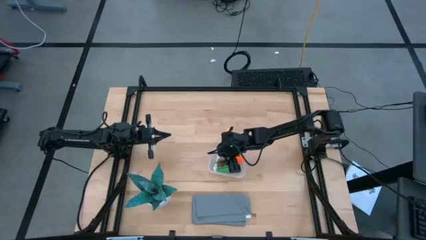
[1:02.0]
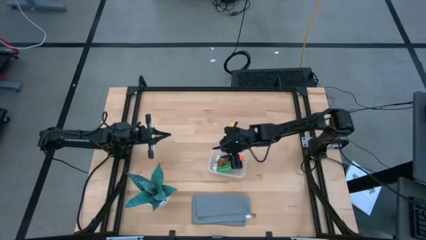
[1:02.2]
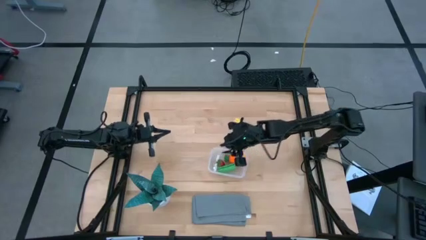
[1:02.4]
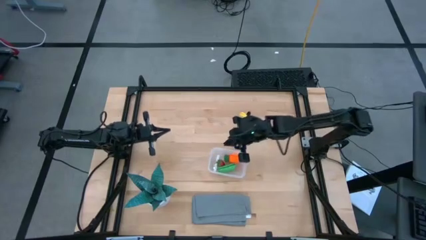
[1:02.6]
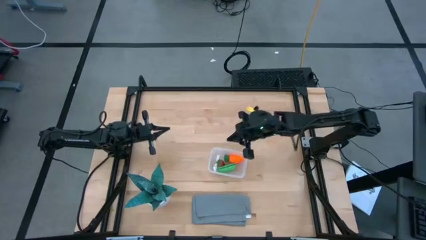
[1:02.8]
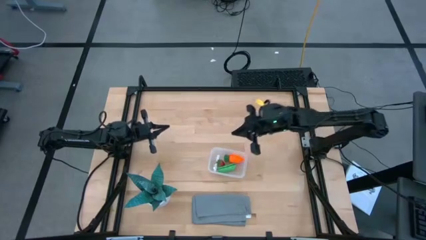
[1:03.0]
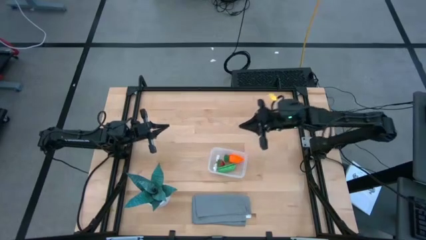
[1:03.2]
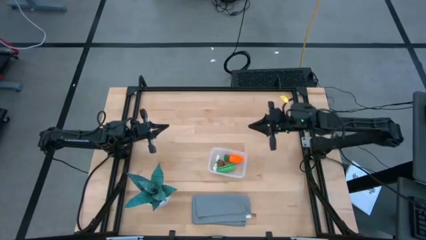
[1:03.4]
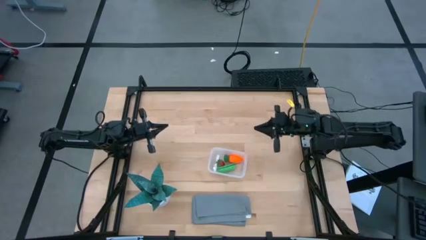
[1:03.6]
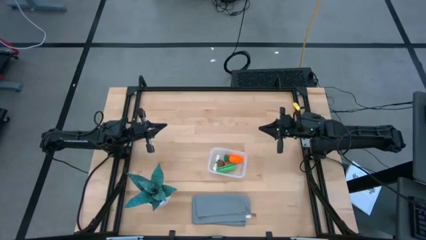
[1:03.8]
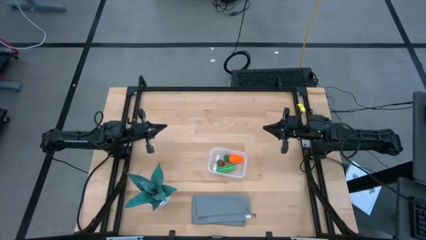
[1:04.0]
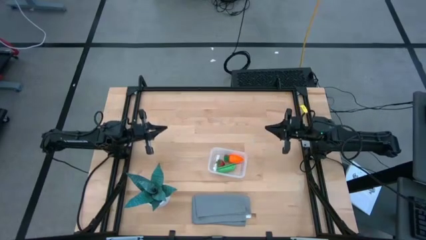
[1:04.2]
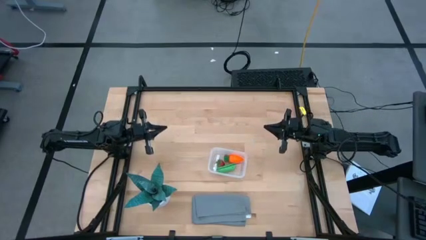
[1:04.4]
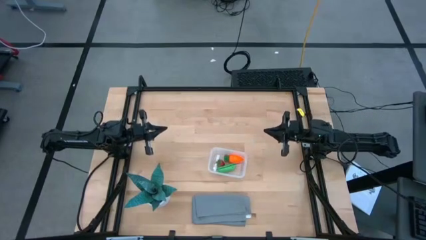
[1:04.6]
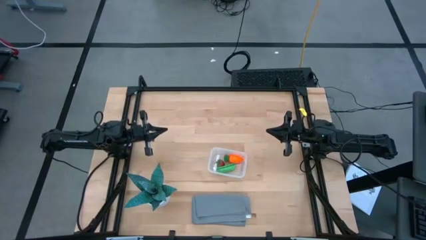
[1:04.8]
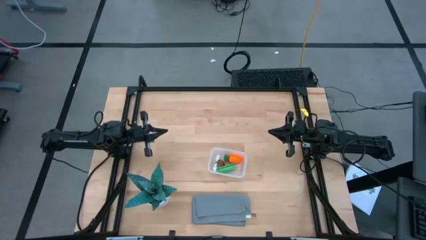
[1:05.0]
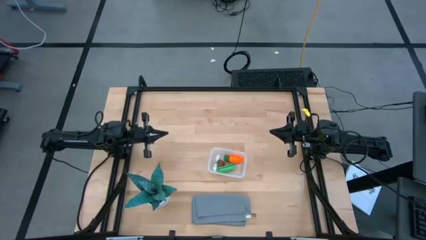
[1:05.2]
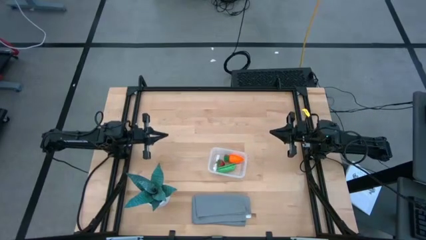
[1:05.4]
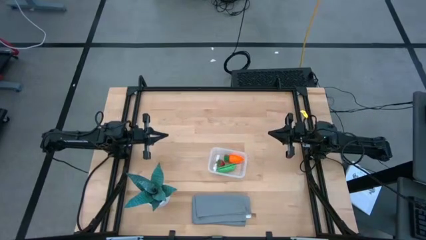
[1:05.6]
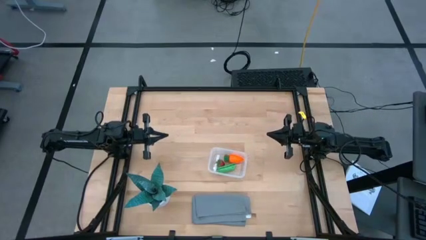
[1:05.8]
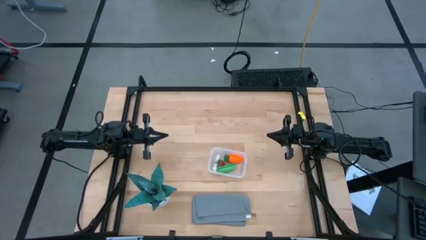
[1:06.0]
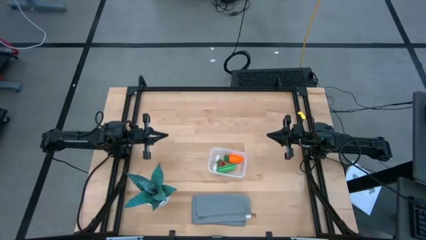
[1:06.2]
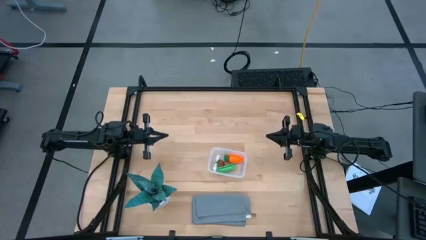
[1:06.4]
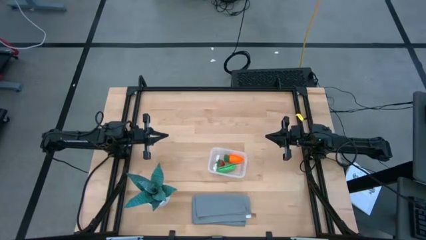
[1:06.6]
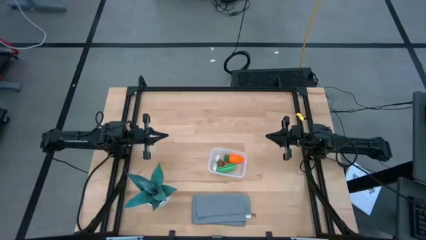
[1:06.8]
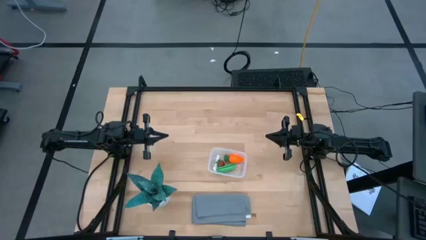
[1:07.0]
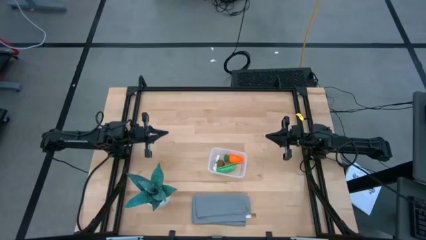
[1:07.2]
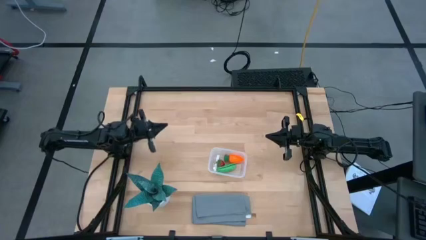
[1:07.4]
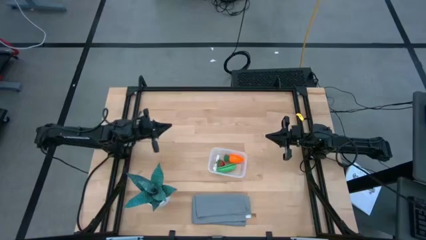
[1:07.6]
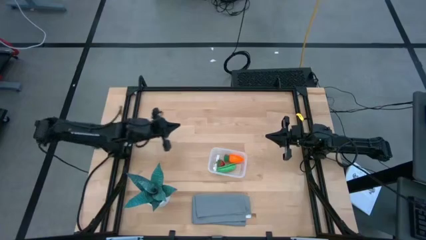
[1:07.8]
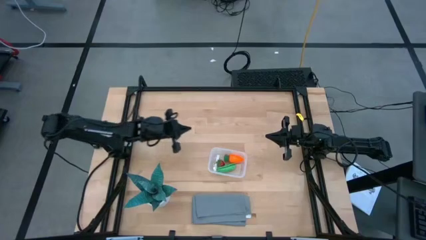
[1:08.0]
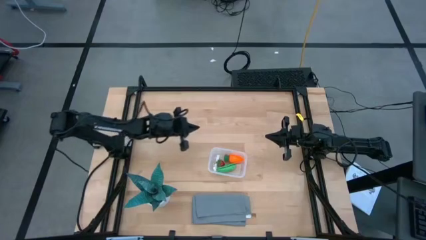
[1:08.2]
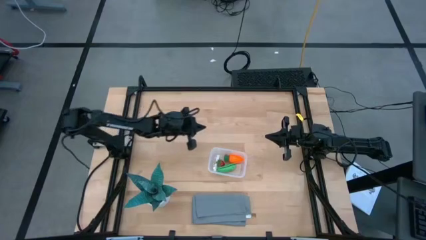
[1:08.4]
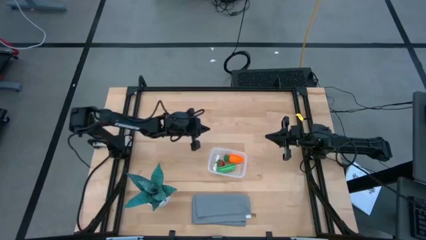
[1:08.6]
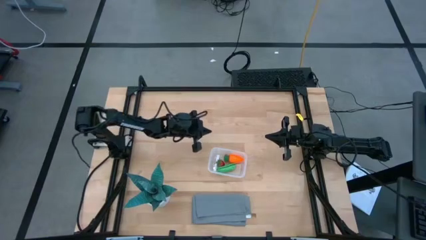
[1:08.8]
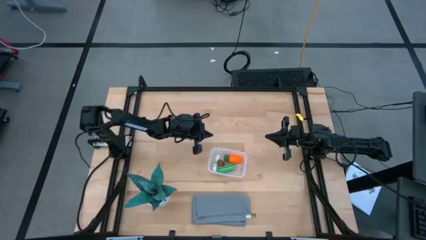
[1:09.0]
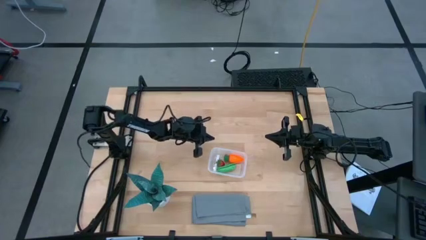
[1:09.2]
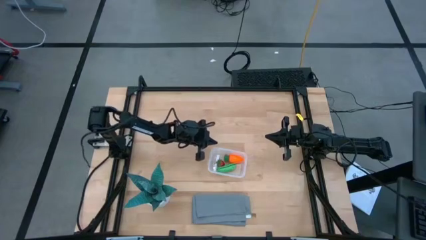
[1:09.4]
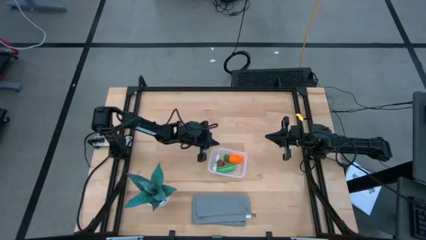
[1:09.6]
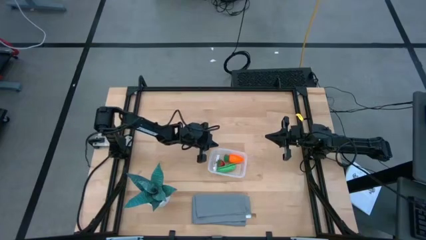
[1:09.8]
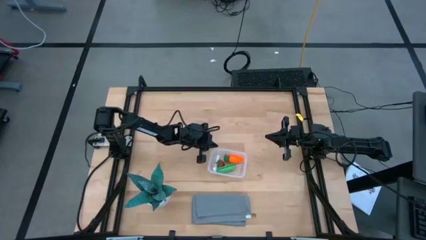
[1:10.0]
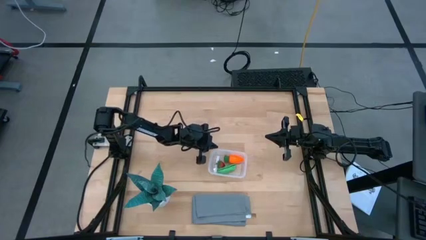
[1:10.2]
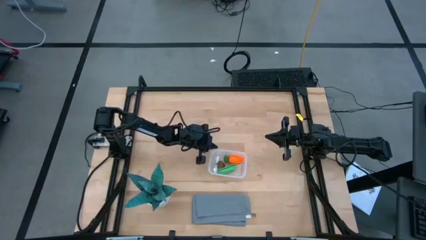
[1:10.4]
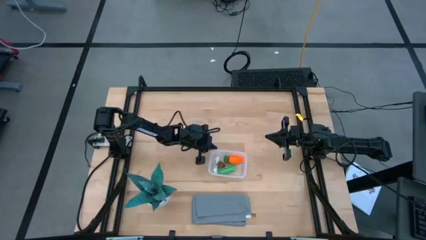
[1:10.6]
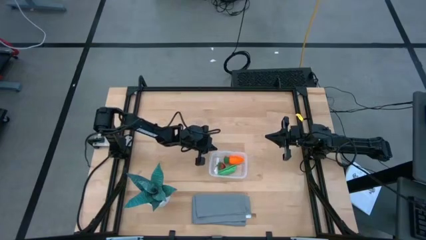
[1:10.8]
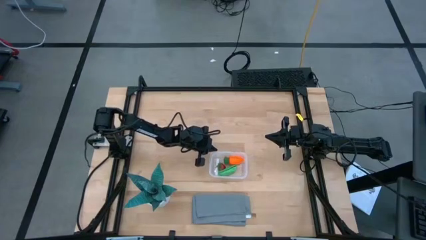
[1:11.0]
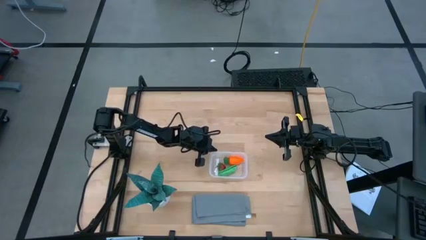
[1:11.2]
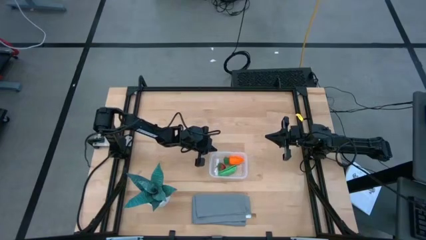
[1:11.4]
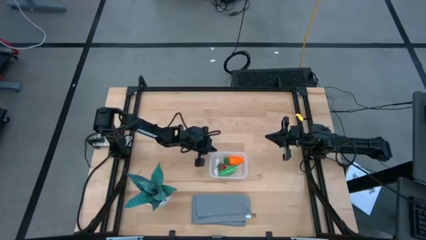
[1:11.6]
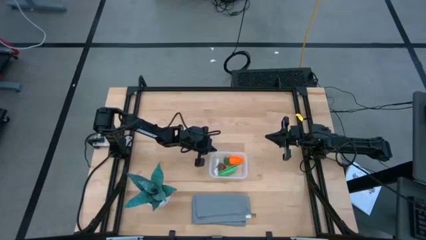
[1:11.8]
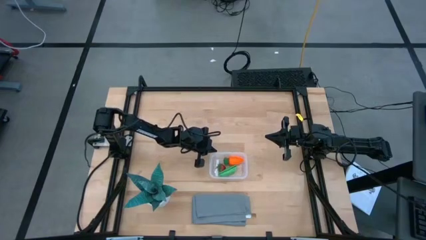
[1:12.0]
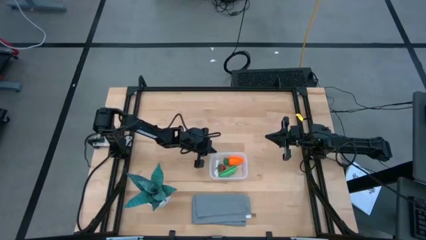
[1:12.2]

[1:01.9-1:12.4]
Task: Pick and placing Produce into tupperware
Adjust the transparent bin

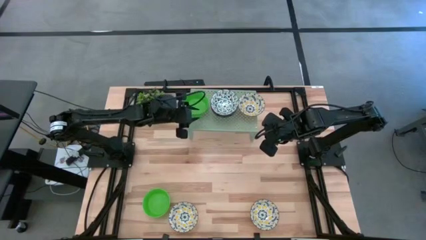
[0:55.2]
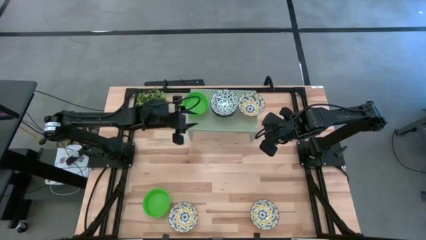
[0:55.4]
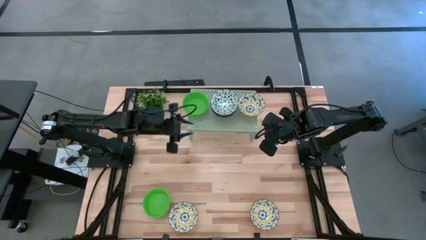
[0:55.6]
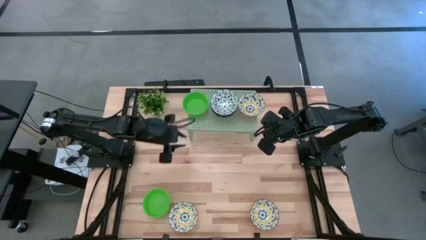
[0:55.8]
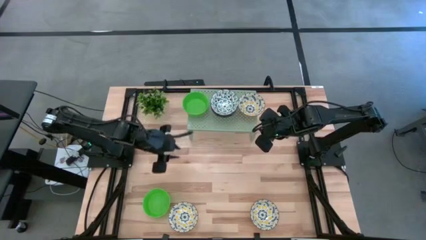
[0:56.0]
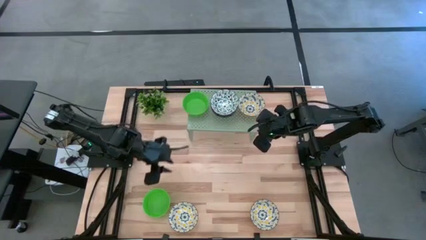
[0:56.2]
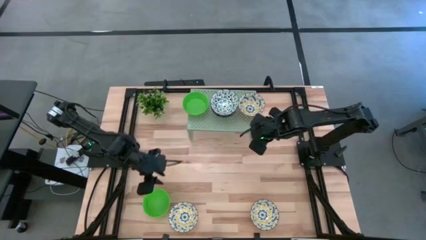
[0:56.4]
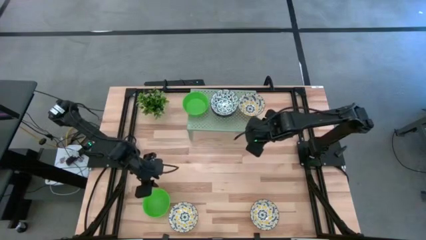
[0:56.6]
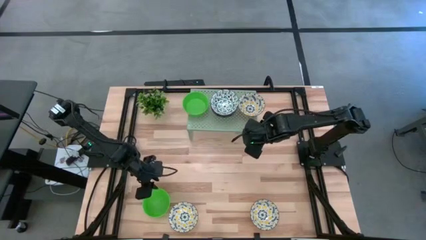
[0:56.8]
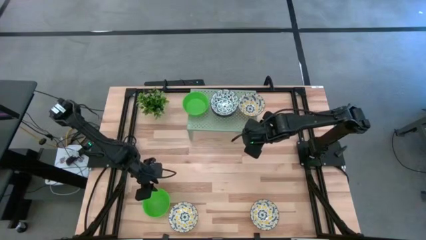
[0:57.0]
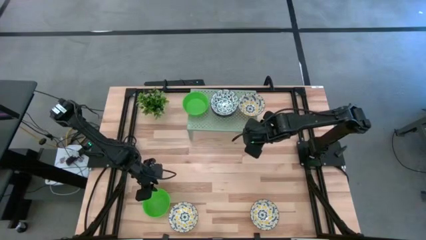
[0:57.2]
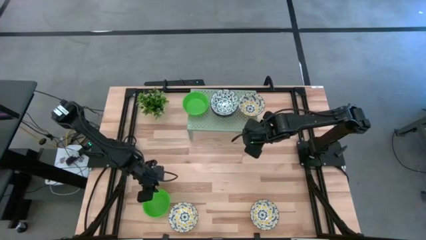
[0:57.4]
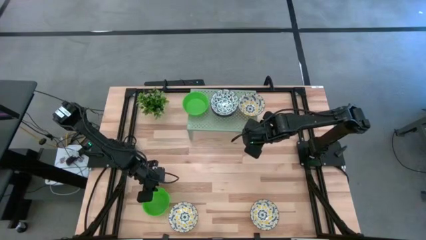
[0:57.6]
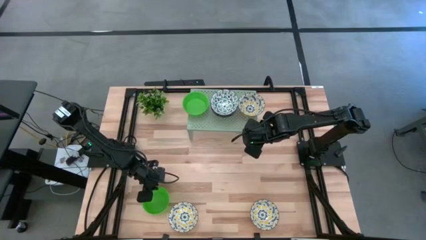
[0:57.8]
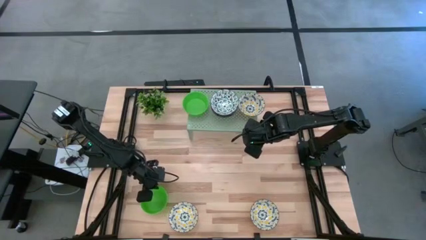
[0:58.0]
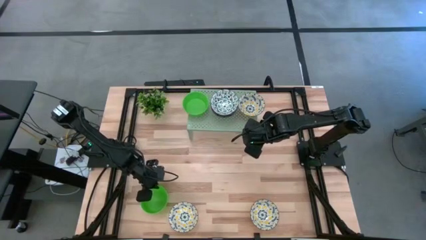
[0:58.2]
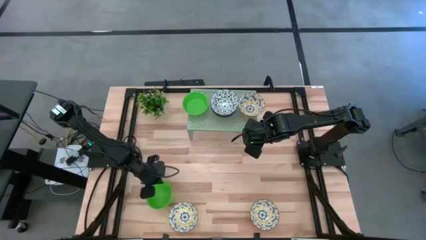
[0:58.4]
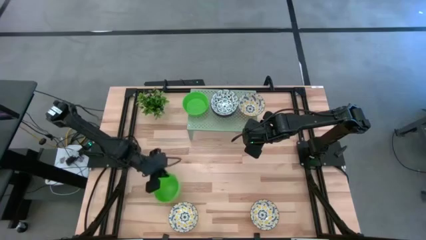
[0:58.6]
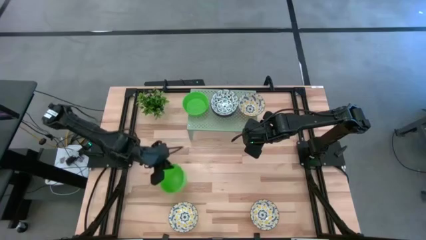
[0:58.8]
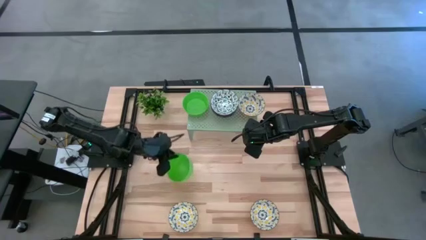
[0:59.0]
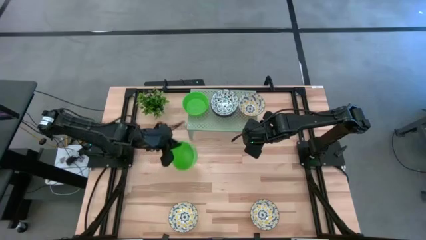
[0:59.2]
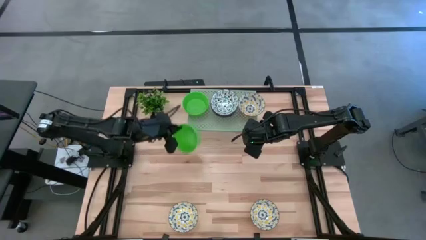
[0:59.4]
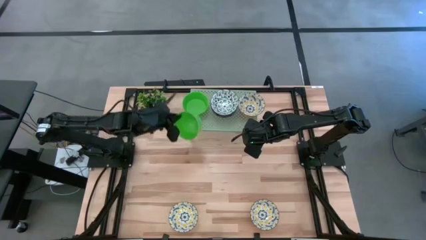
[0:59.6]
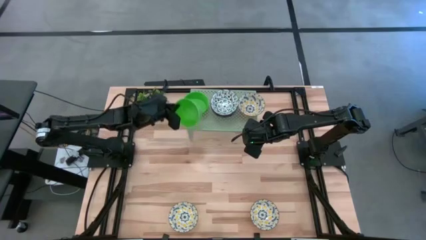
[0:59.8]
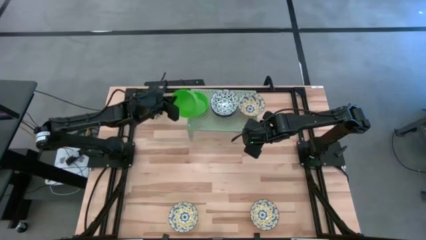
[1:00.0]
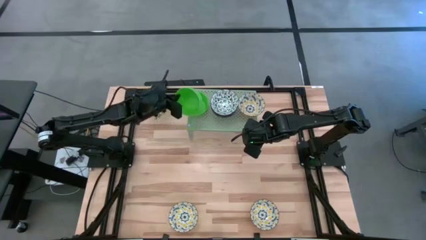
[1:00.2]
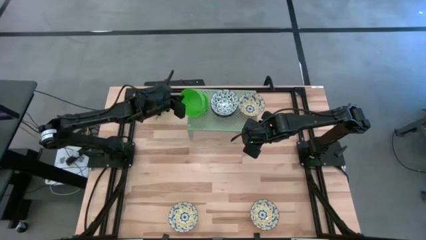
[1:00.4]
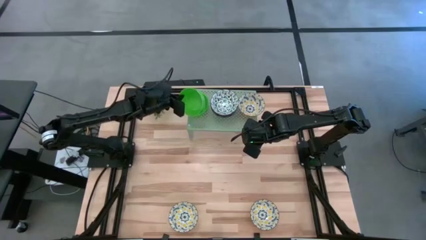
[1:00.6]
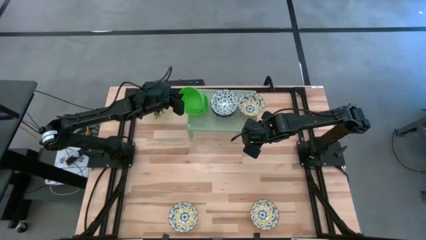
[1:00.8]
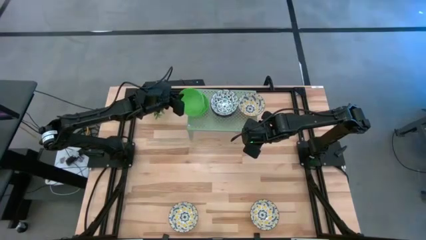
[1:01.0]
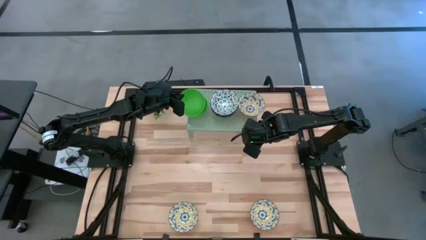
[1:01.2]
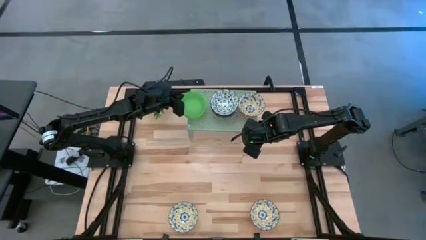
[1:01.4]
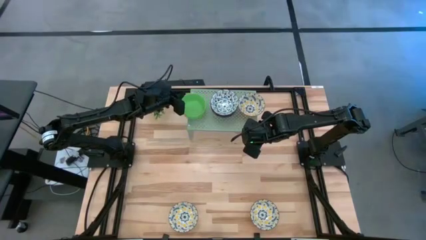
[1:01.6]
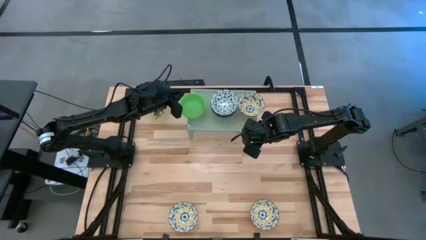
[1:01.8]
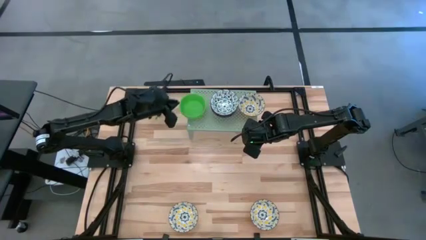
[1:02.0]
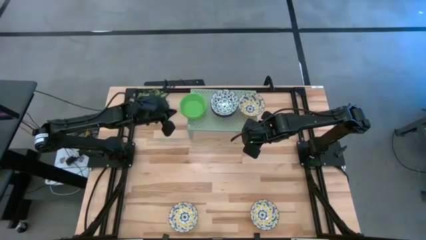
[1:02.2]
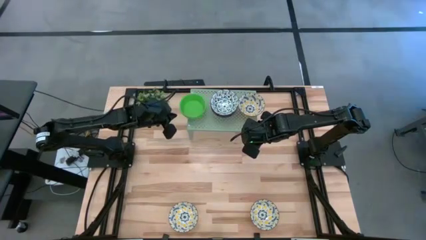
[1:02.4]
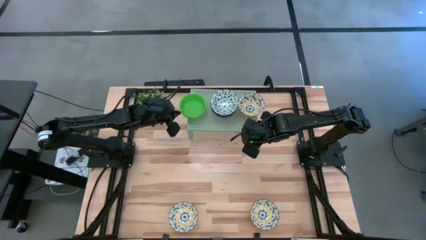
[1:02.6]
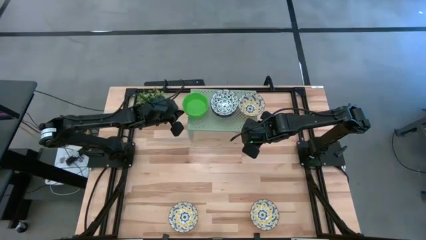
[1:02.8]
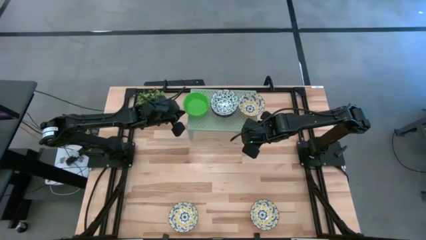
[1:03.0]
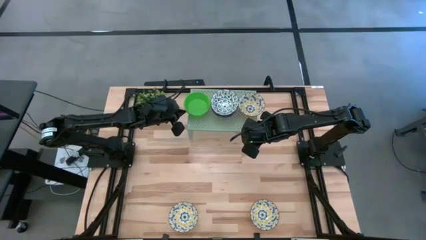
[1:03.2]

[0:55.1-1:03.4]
Task: Pick & Place Mini bowls
Stack the green bowl on top of the green bowl on the shelf
